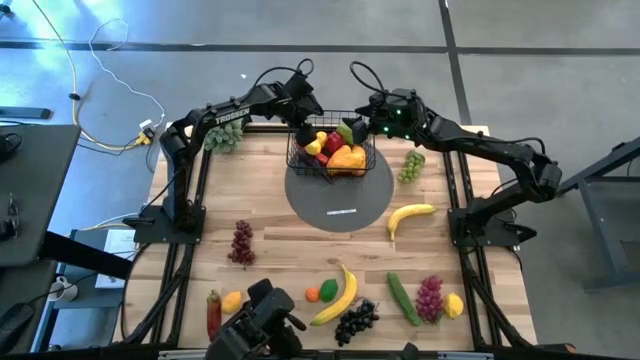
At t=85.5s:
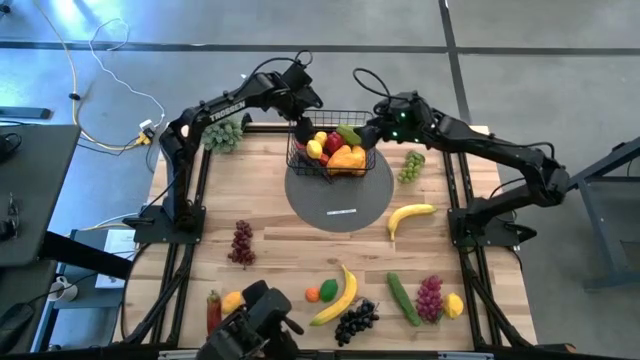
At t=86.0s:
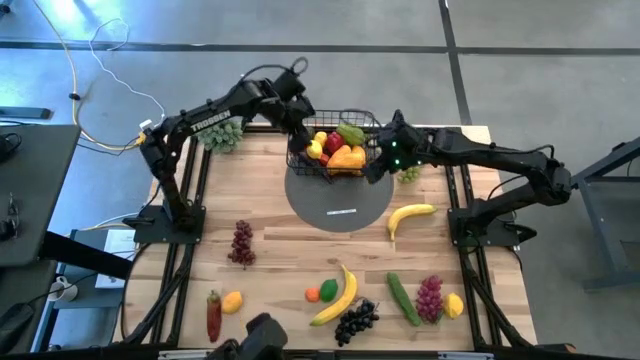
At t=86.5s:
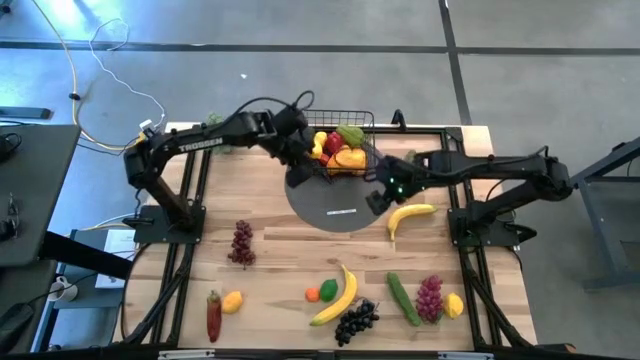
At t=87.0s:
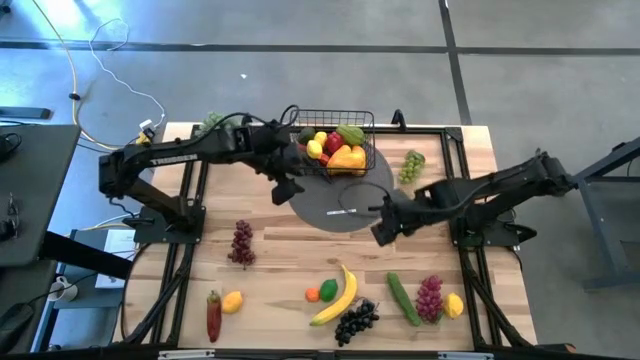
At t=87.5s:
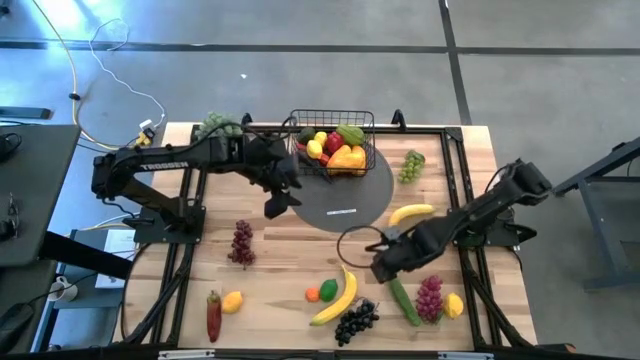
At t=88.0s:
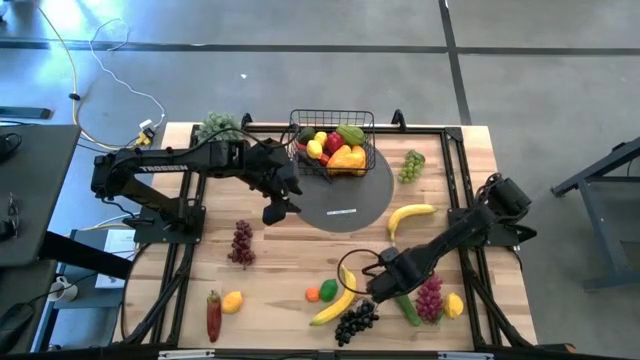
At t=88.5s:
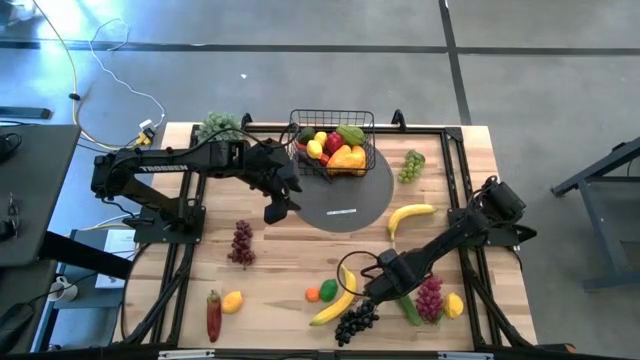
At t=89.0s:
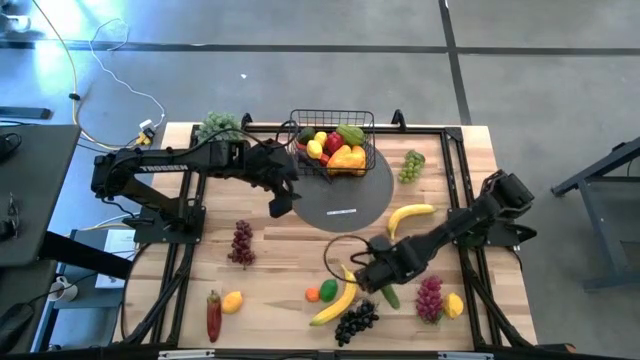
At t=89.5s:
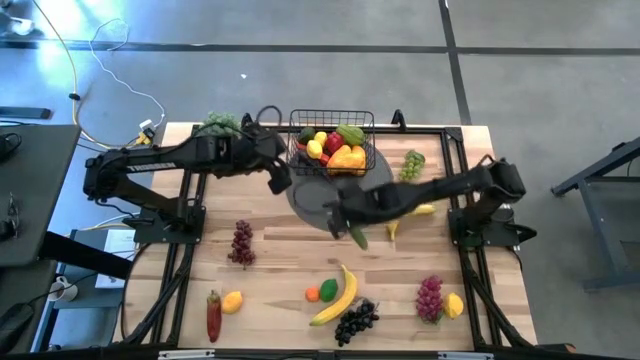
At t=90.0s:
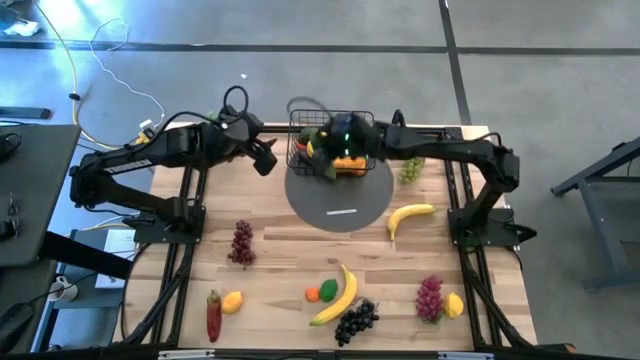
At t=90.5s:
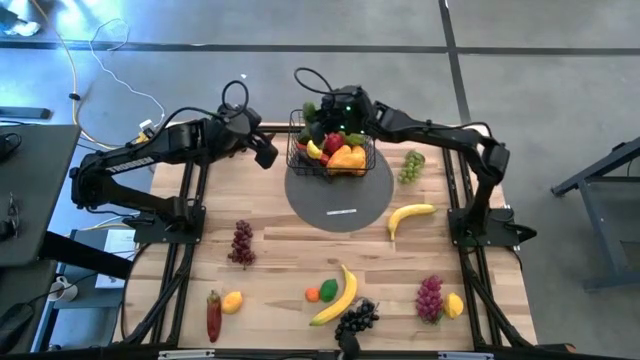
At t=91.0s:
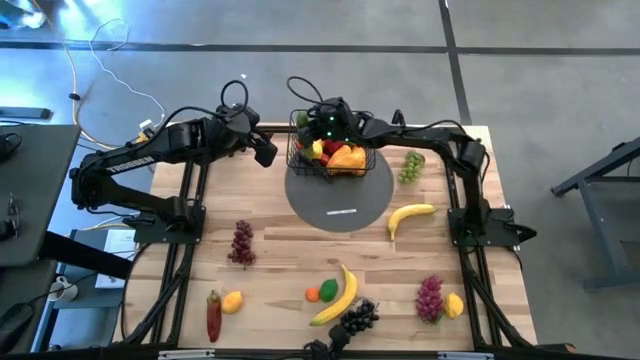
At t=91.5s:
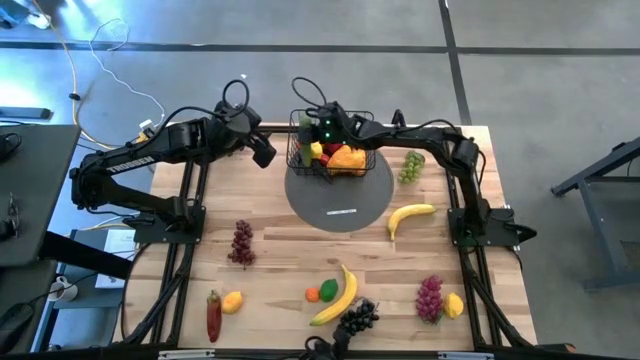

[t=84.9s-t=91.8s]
Task: Build produce basket
Put the cucumber into the wire basket

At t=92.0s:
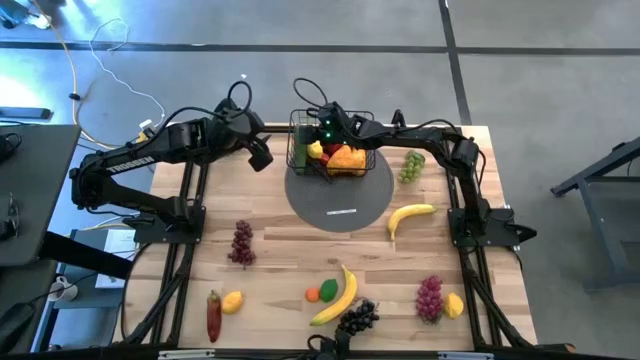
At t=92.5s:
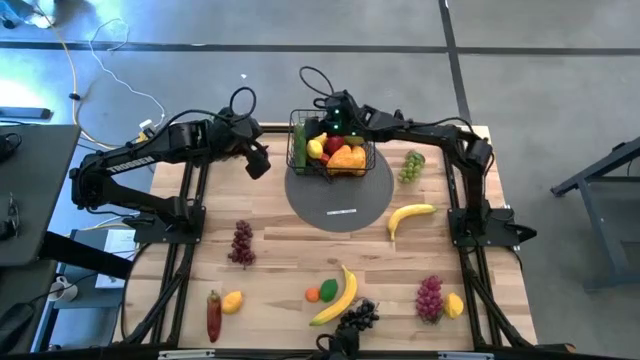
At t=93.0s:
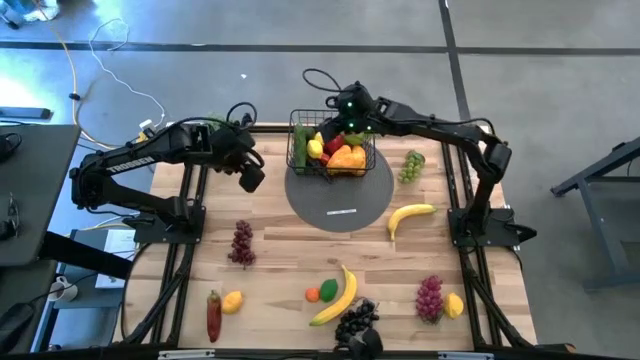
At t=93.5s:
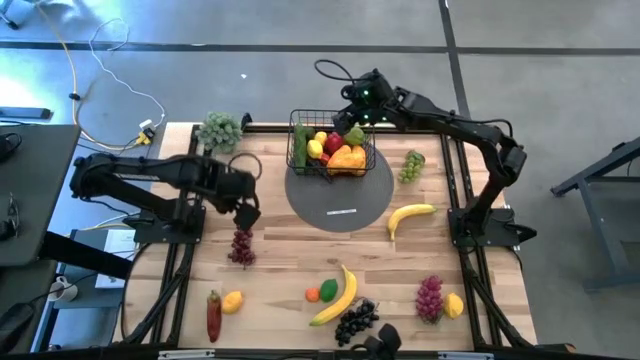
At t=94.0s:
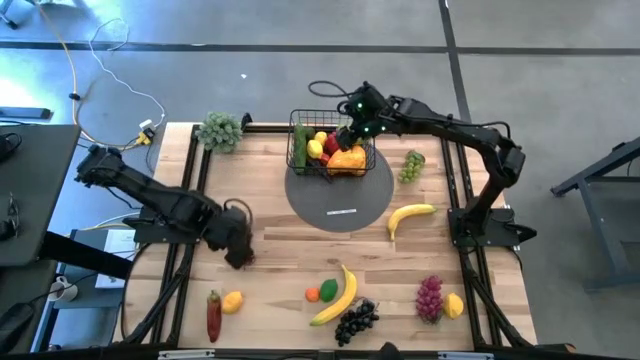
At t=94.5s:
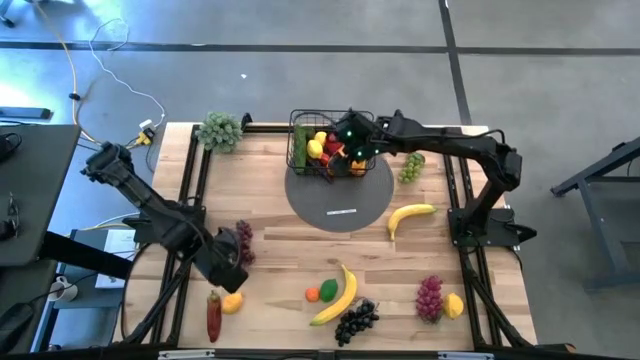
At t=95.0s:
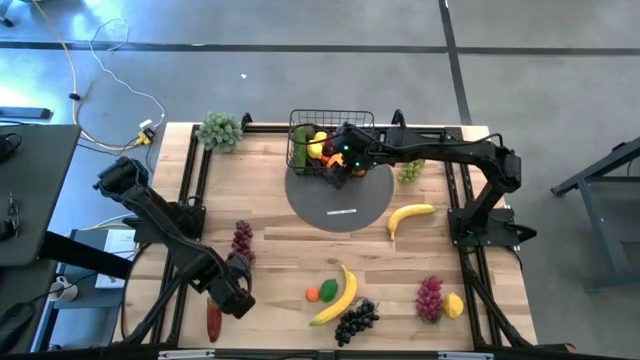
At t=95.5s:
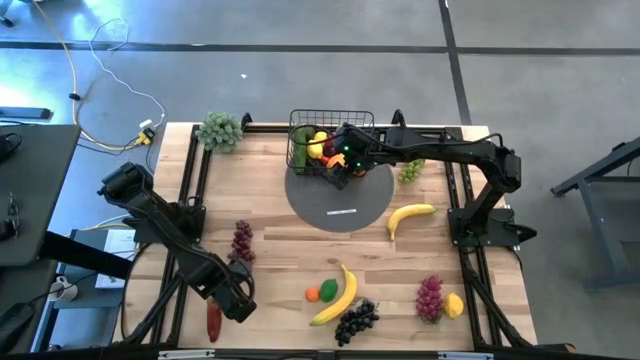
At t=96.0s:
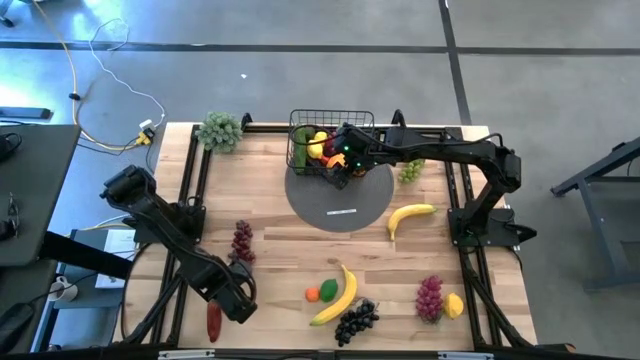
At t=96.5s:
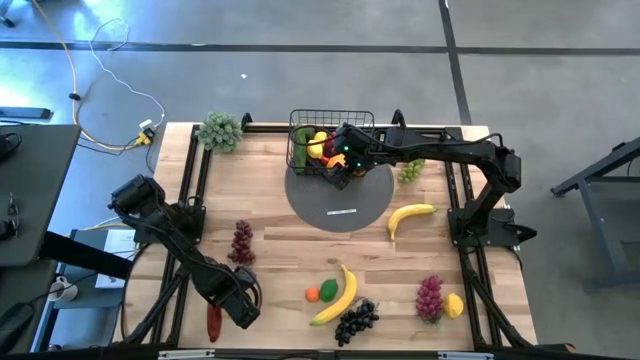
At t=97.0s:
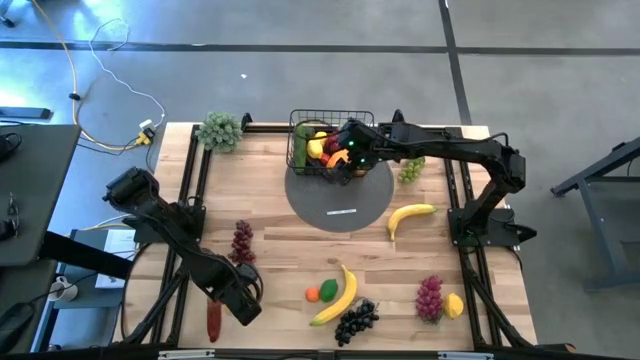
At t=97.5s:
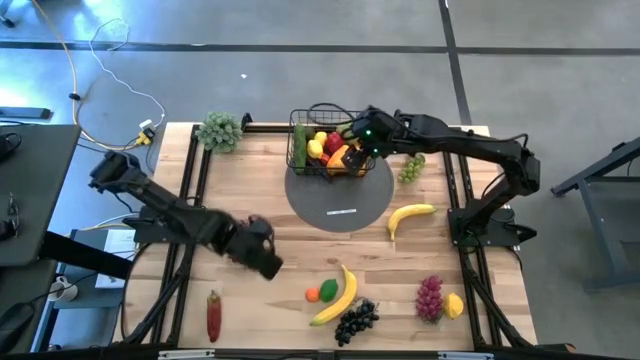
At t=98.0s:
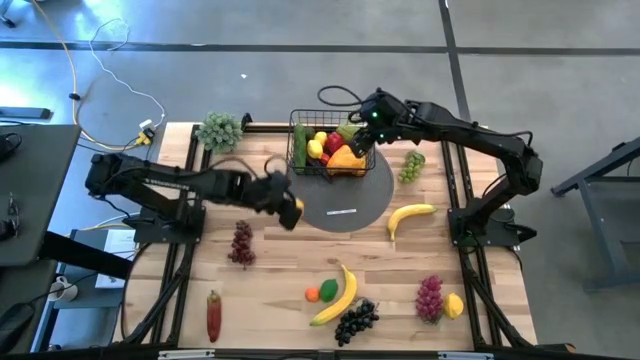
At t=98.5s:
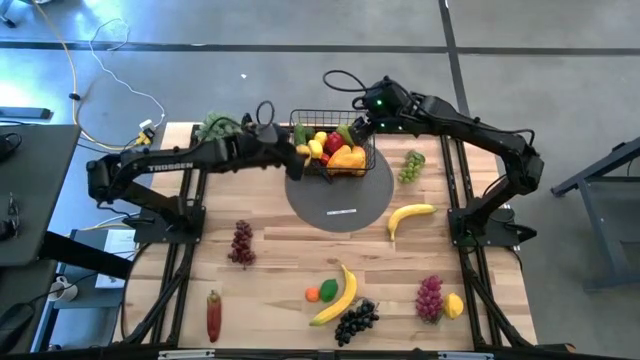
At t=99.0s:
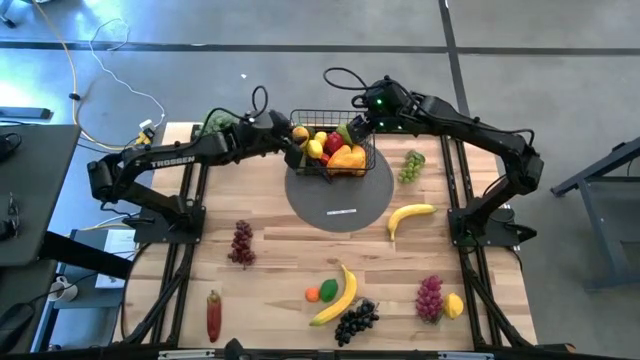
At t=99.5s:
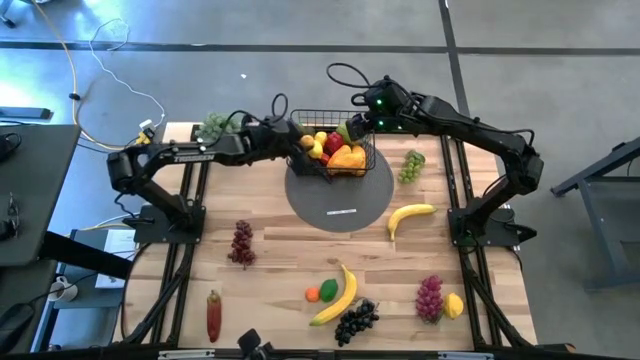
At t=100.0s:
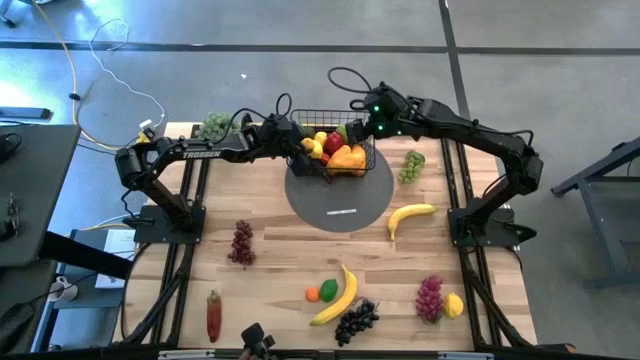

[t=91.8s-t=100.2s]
Put the lemon into the wire basket

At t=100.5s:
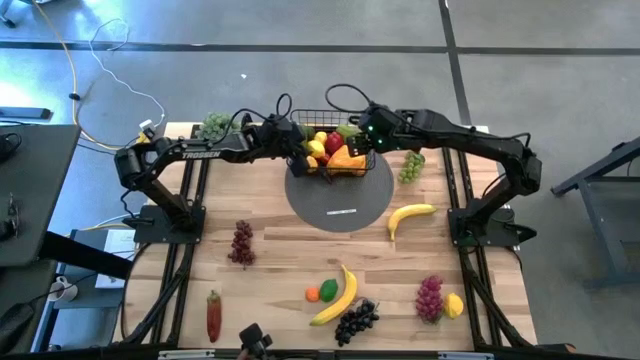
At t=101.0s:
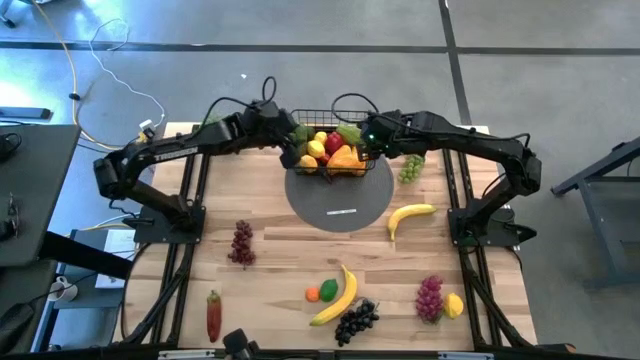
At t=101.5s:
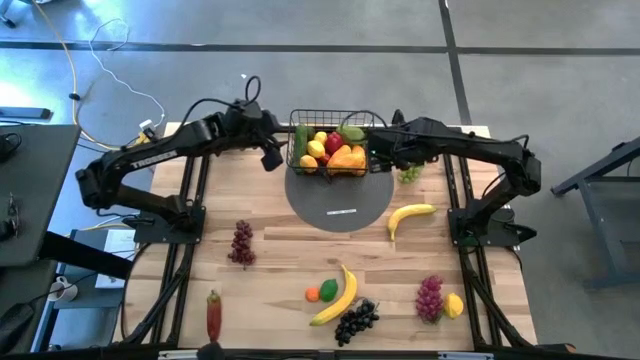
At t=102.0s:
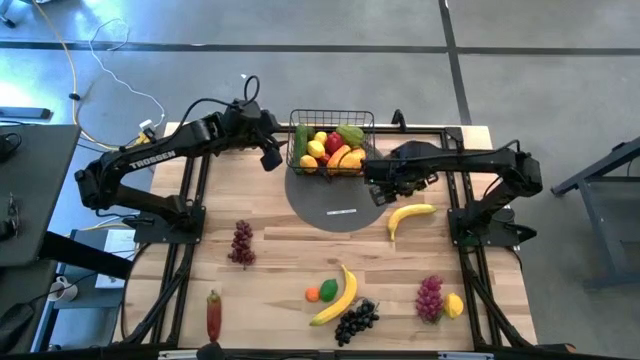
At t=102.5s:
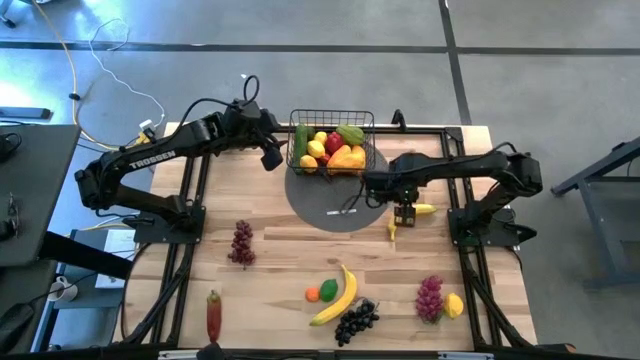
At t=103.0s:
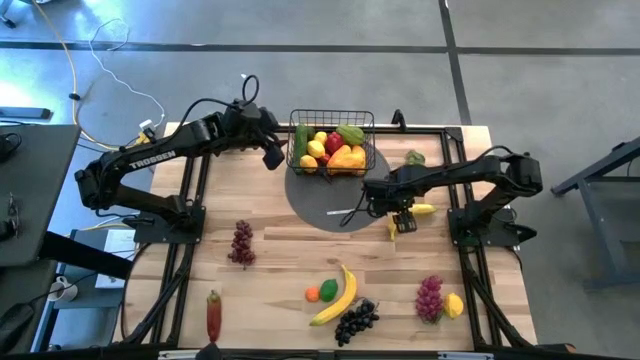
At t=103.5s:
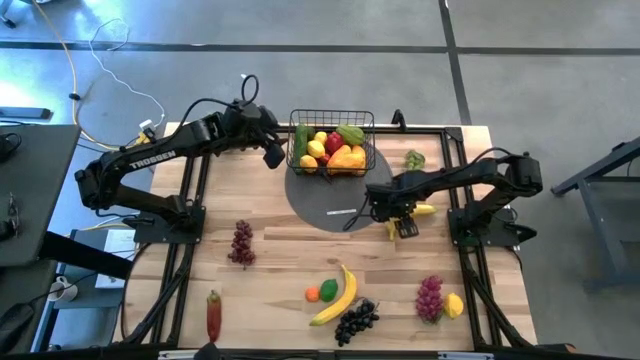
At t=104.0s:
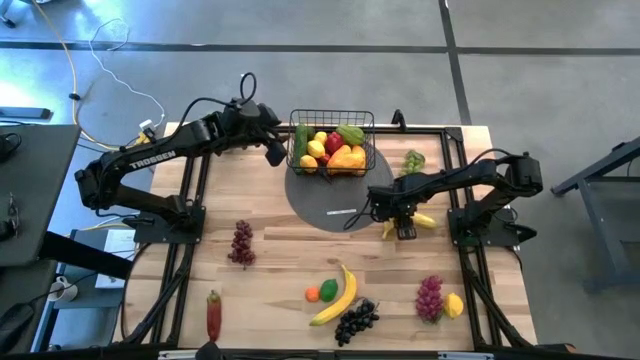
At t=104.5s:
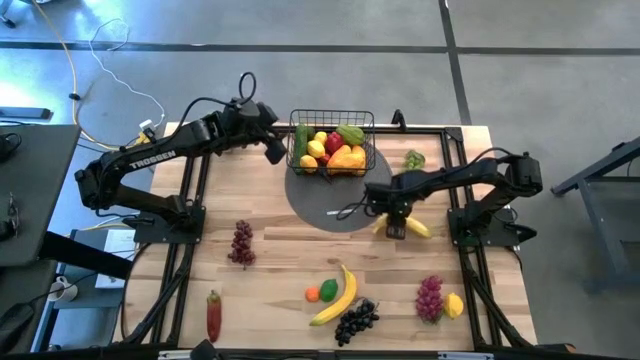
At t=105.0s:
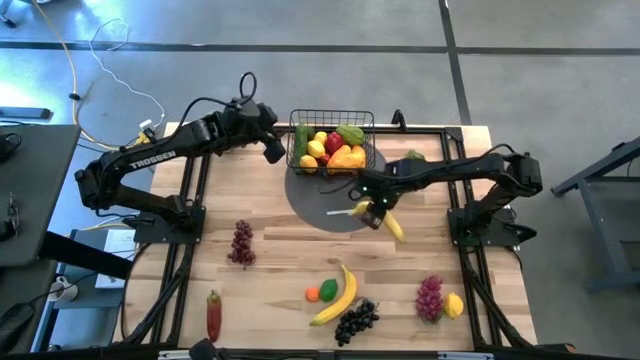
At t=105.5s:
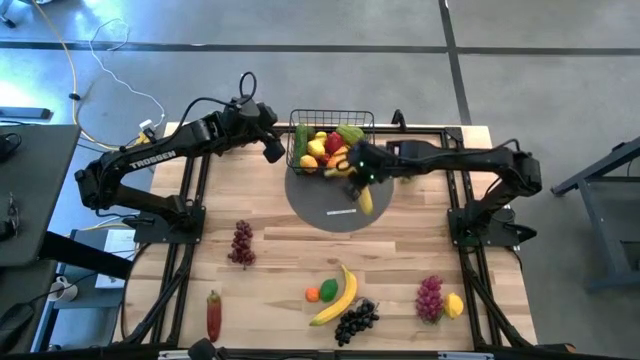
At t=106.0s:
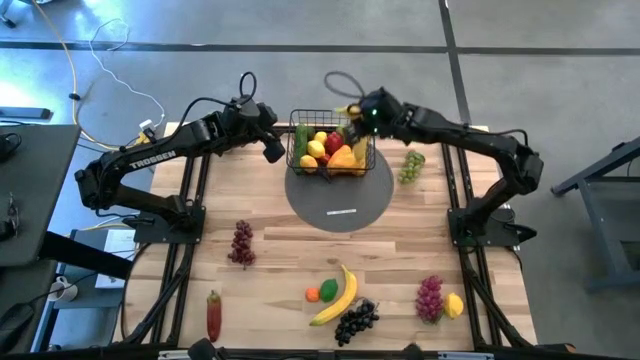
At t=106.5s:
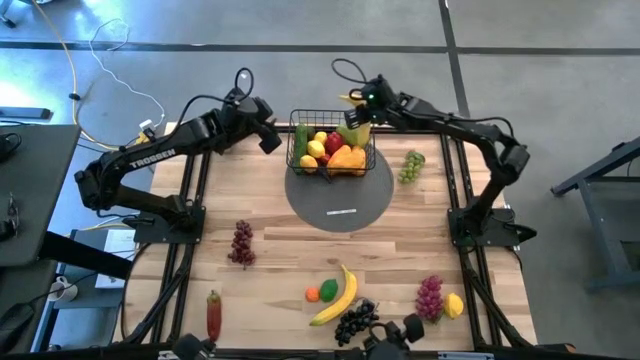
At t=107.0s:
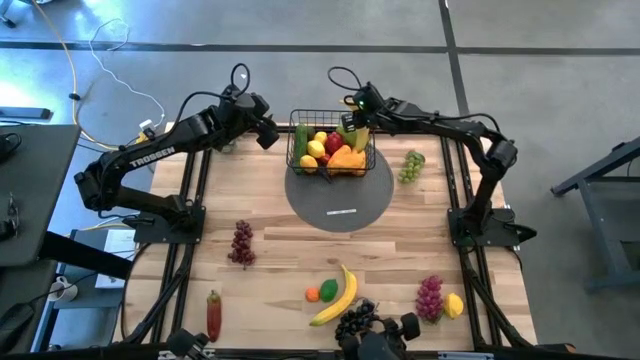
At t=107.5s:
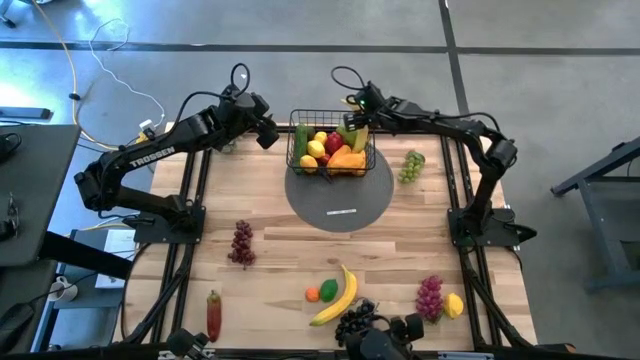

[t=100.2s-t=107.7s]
Put the banana into the wire basket
